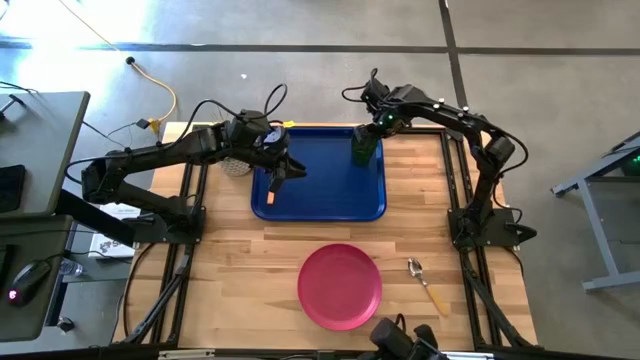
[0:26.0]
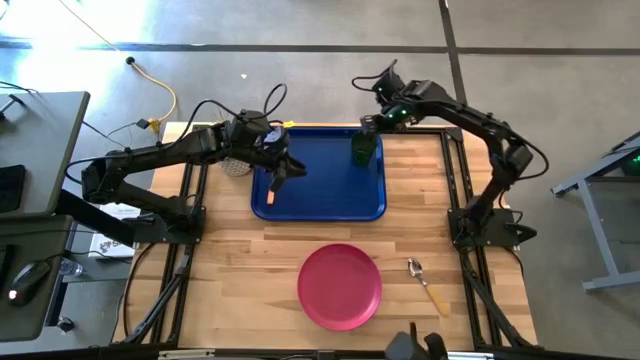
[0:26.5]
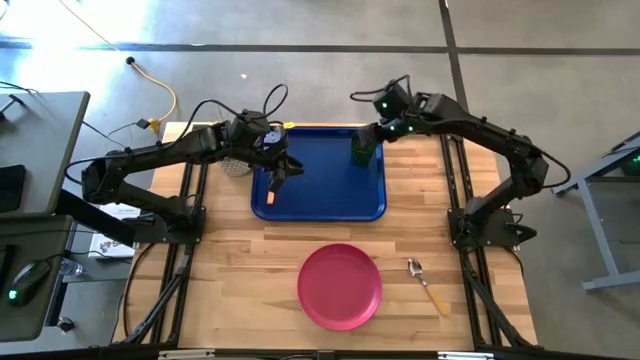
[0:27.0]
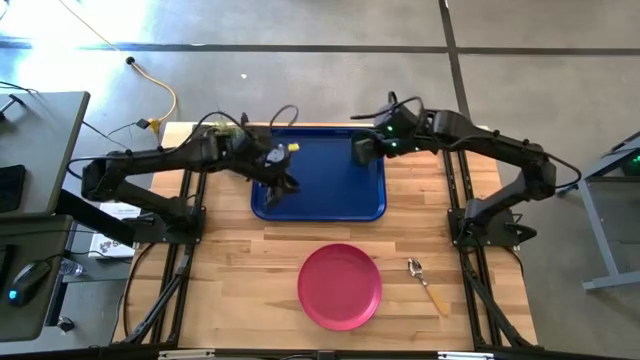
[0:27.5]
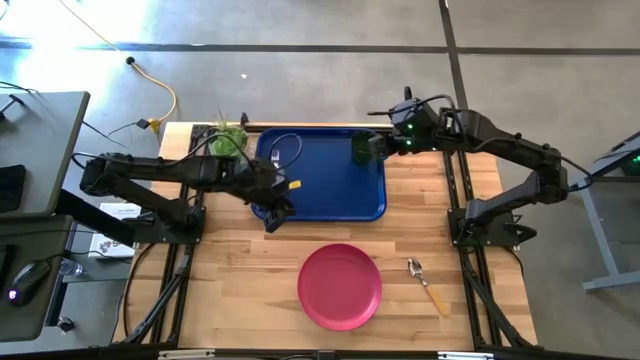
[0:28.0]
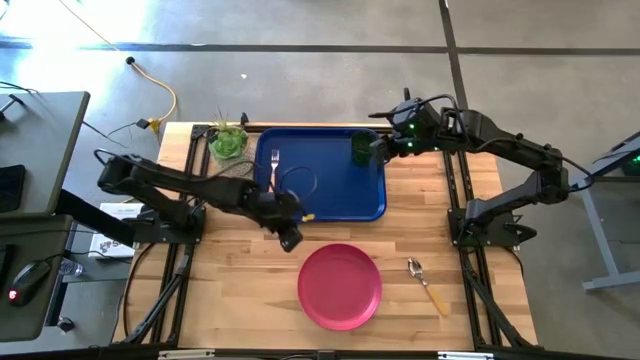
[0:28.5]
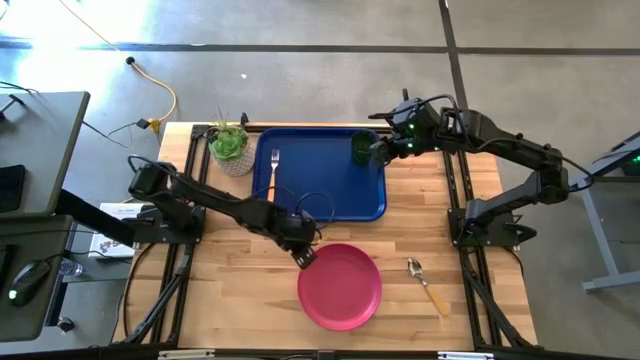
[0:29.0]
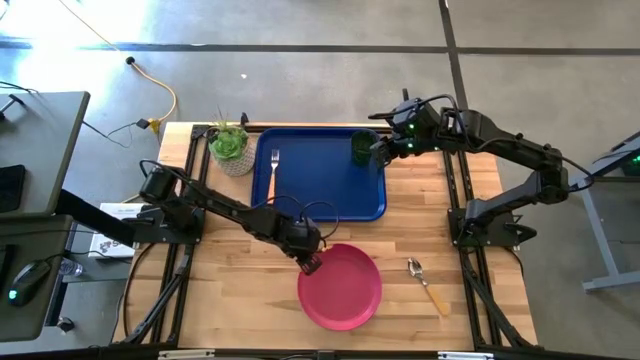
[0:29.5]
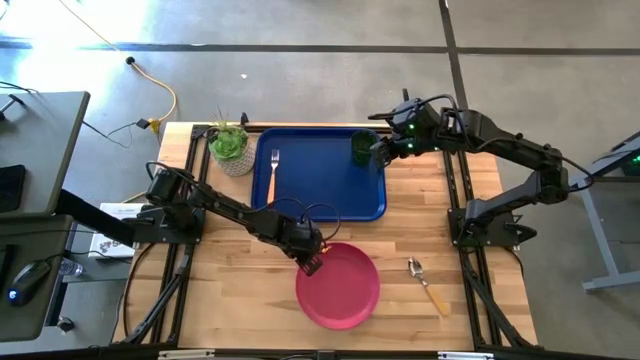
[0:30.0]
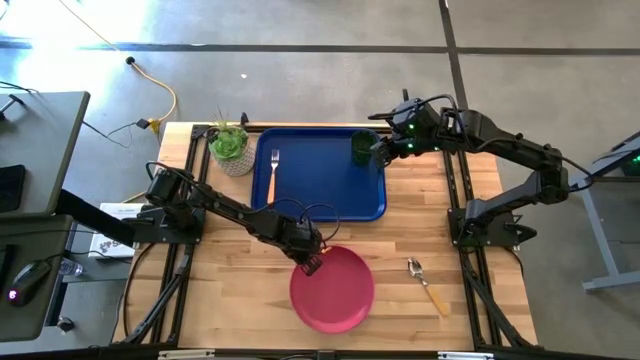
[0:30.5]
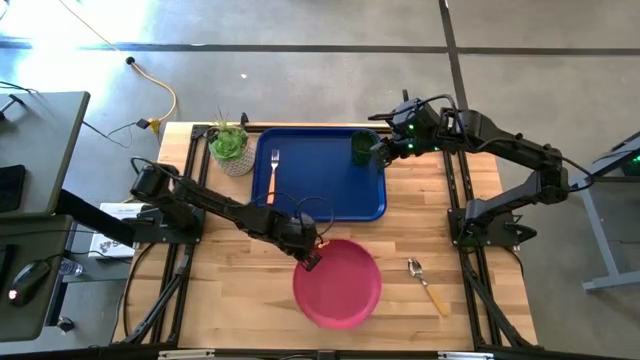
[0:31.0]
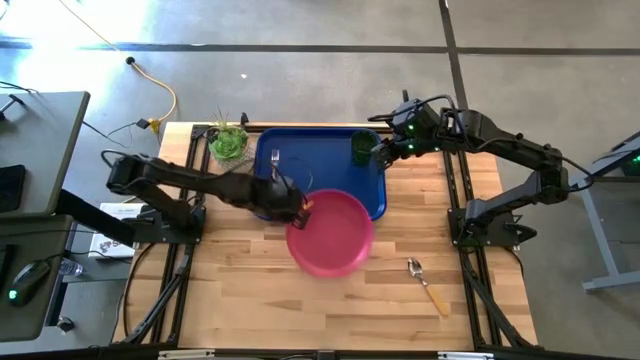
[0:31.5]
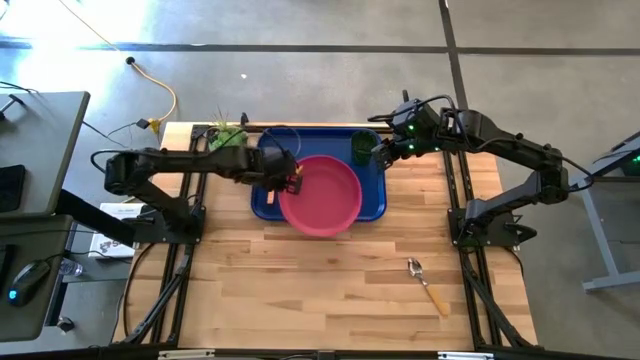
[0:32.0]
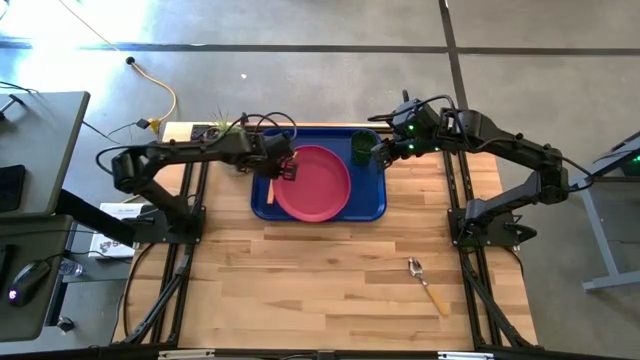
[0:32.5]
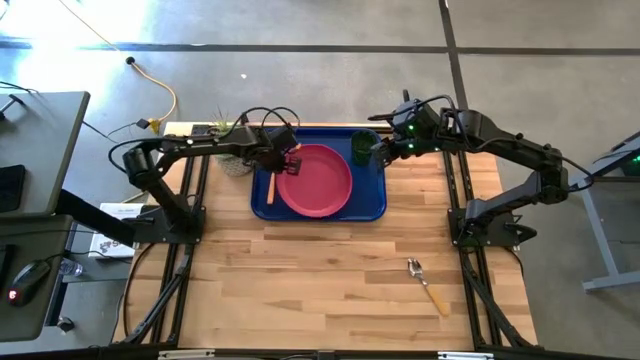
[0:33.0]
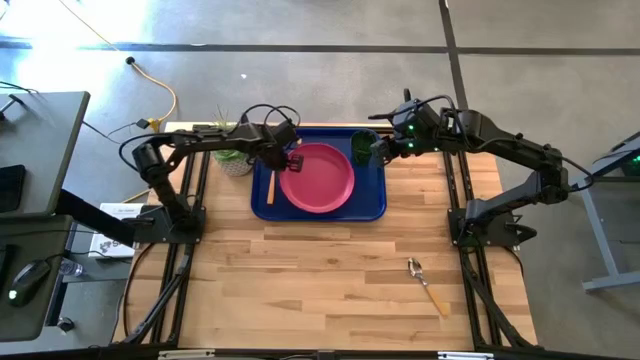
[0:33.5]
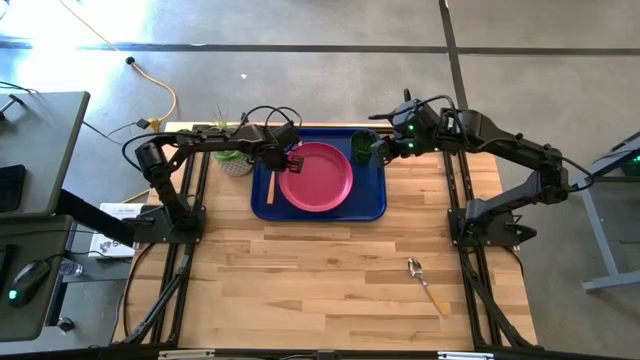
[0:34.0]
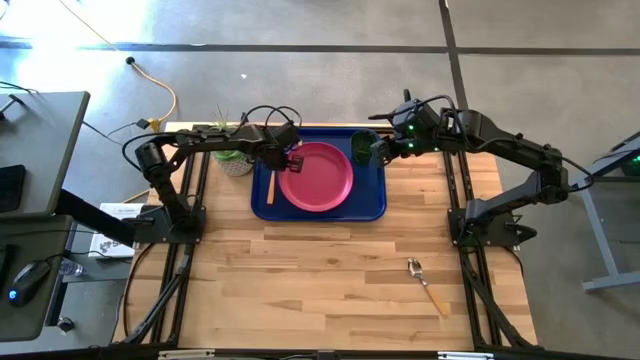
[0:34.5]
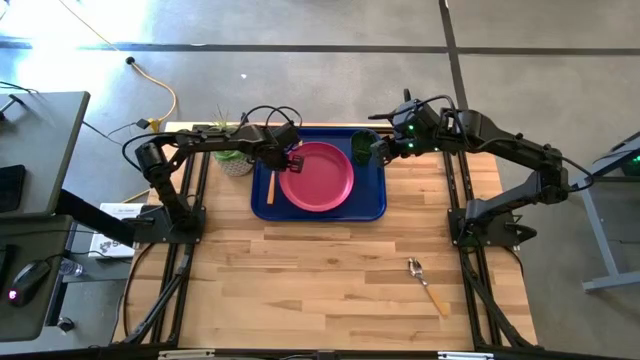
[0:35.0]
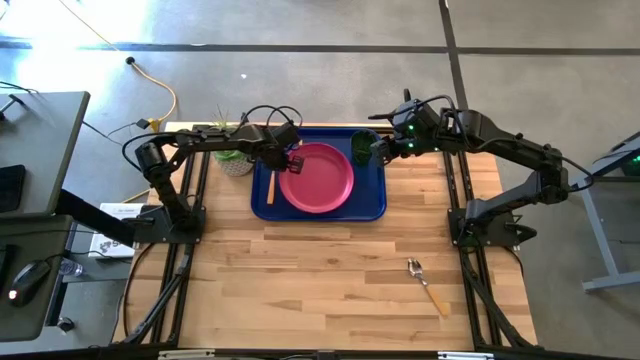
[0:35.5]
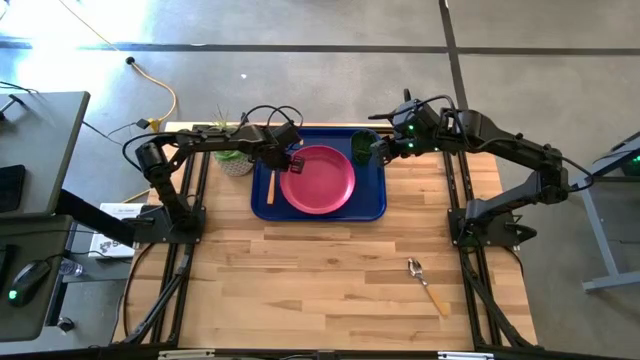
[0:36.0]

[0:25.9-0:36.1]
Task: Pick and place plate/cup/fork/spoon on tray
Put the pink plate on the blue tray

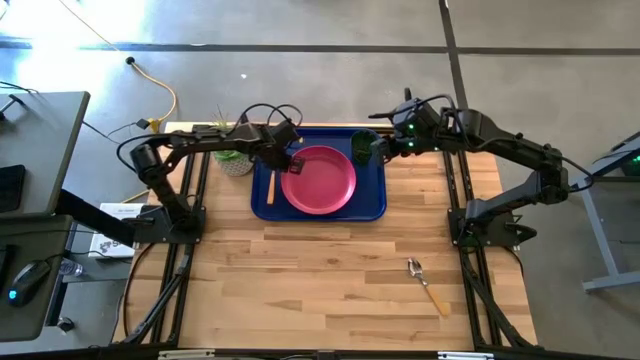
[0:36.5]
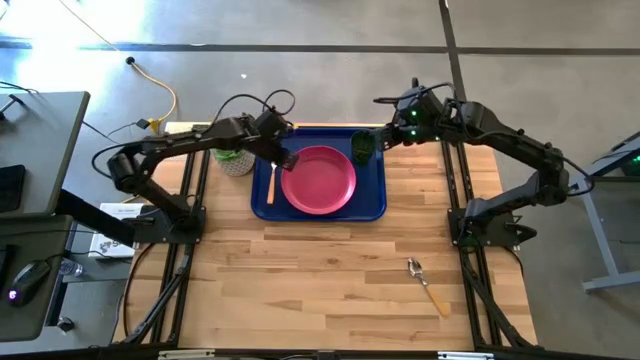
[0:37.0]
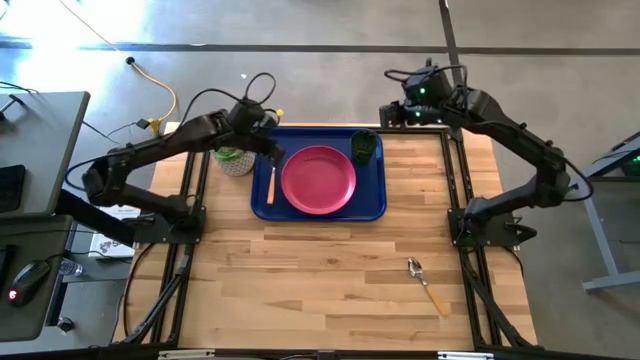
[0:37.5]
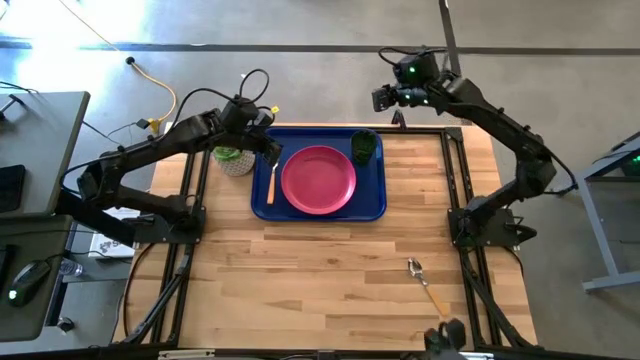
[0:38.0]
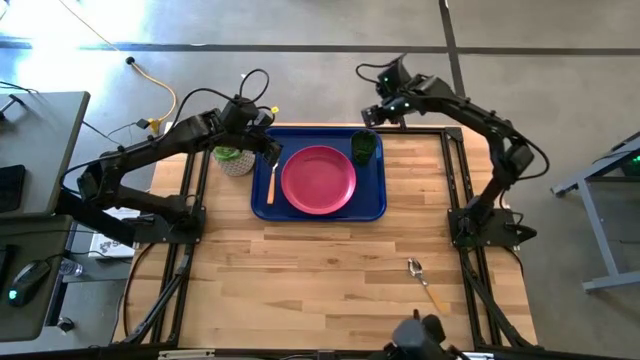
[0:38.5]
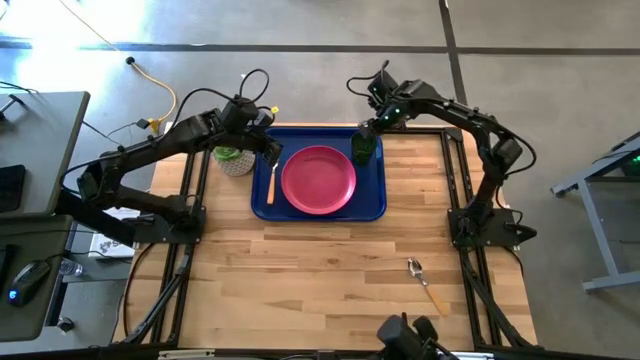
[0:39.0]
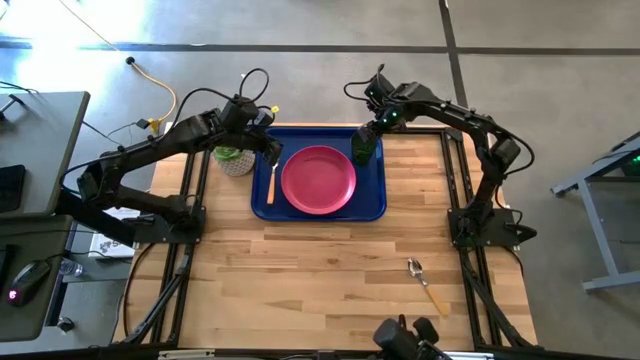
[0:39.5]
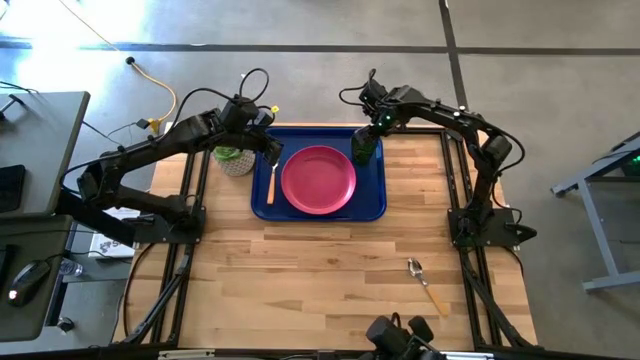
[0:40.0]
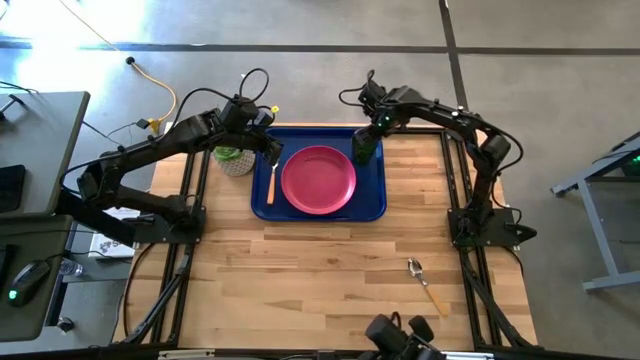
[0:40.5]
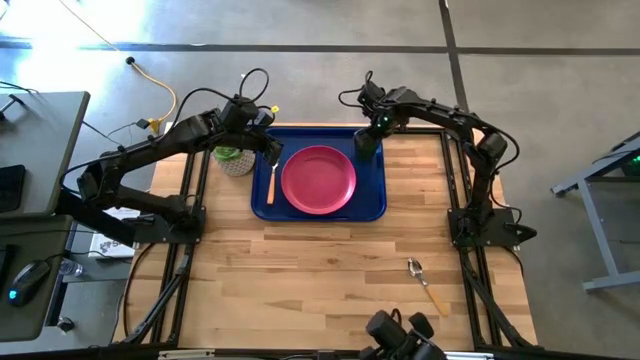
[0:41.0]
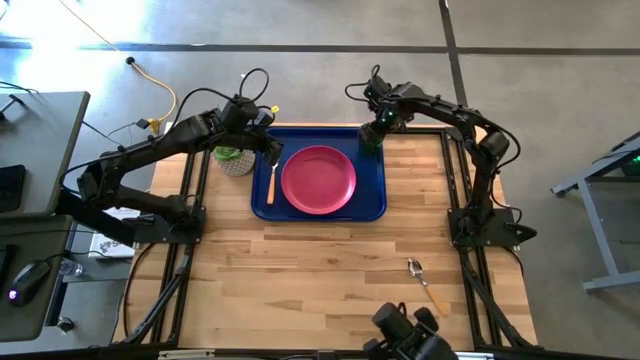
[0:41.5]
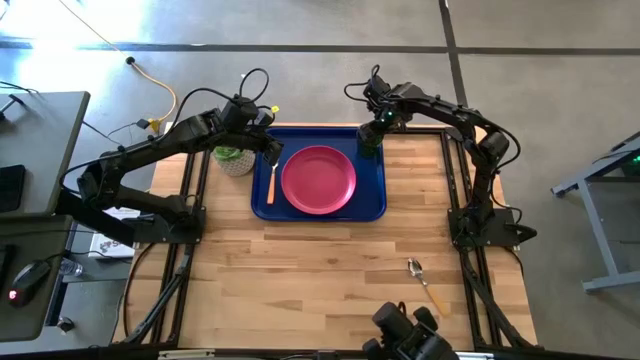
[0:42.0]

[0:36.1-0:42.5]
Adjust the green cup on the blue tray

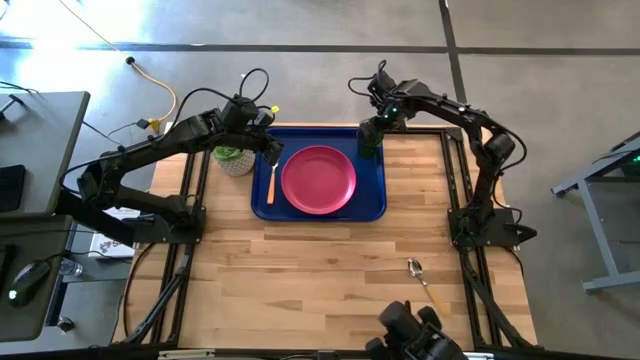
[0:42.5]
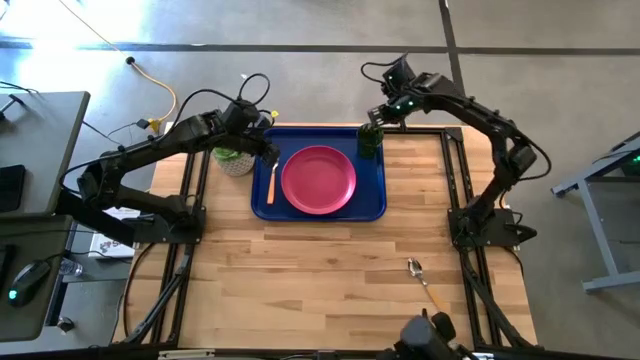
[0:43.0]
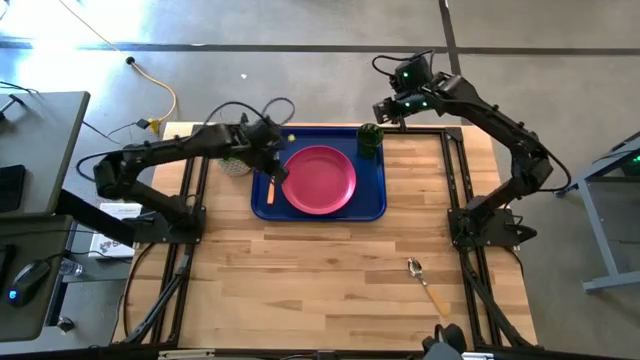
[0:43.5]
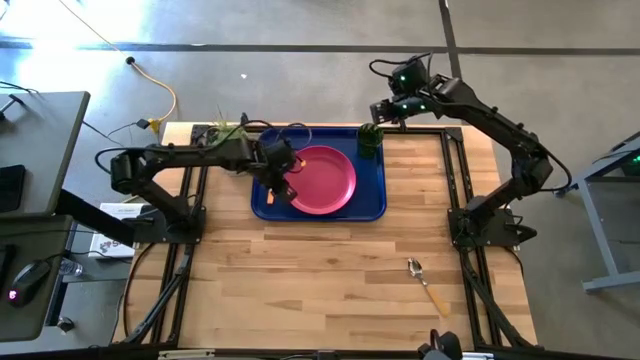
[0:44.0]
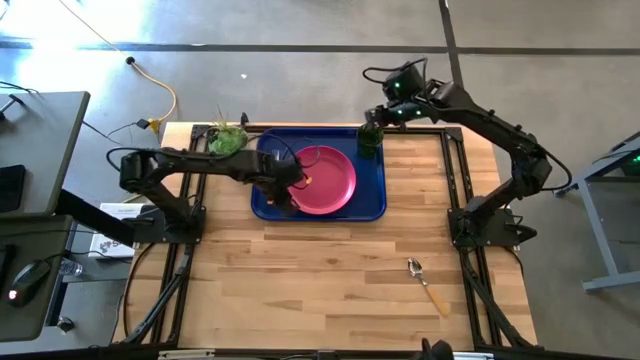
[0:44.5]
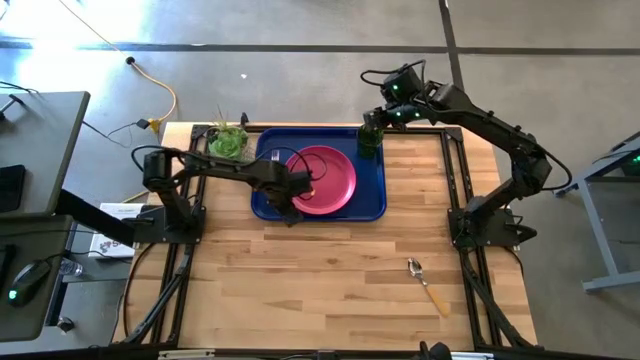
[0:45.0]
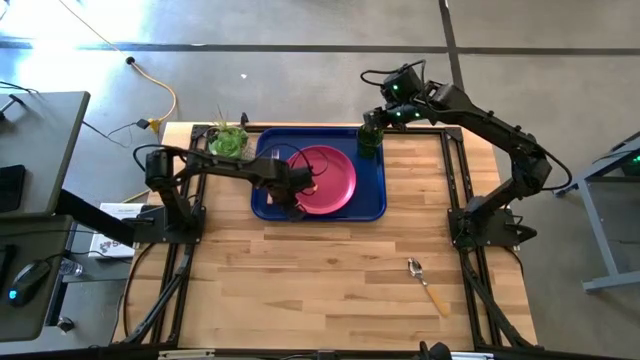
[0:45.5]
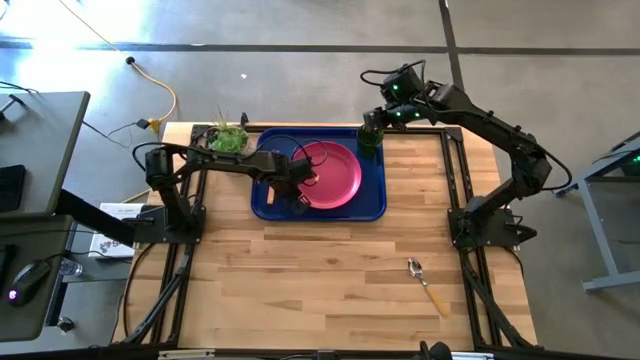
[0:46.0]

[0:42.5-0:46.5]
Adjust the pink plate on the blue tray

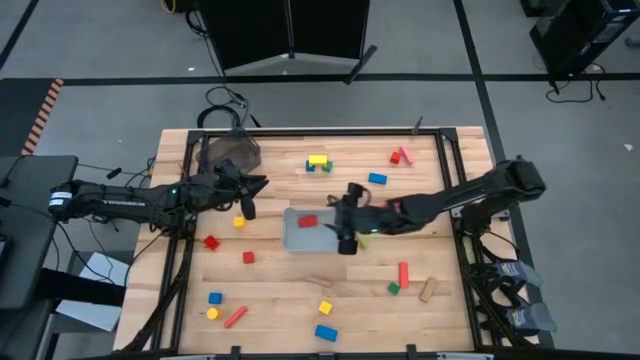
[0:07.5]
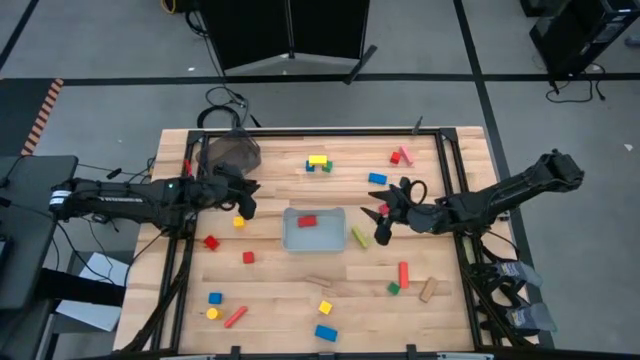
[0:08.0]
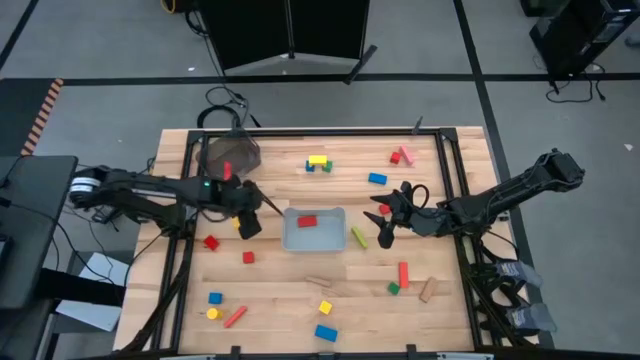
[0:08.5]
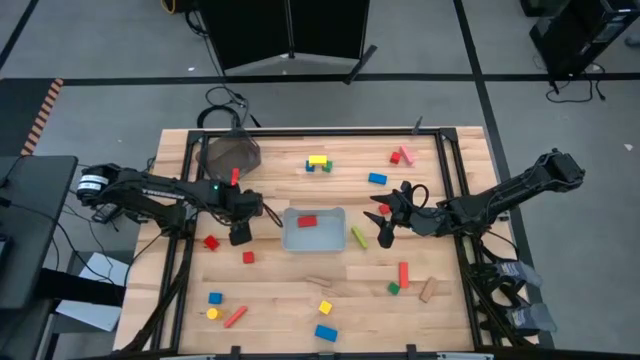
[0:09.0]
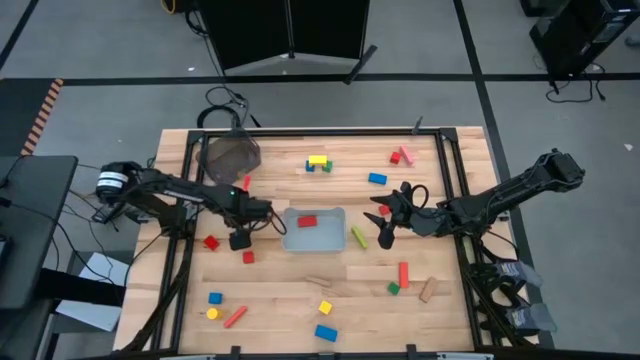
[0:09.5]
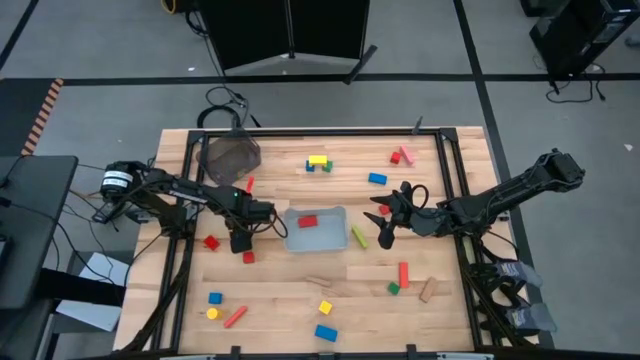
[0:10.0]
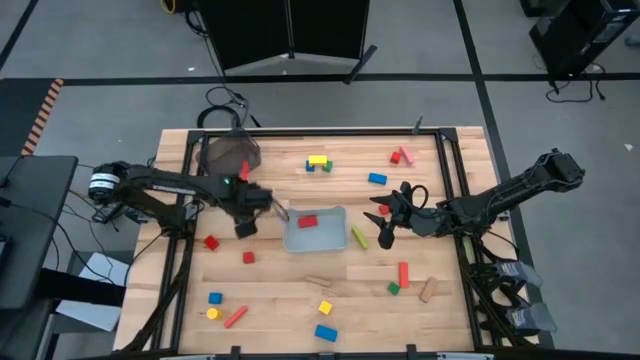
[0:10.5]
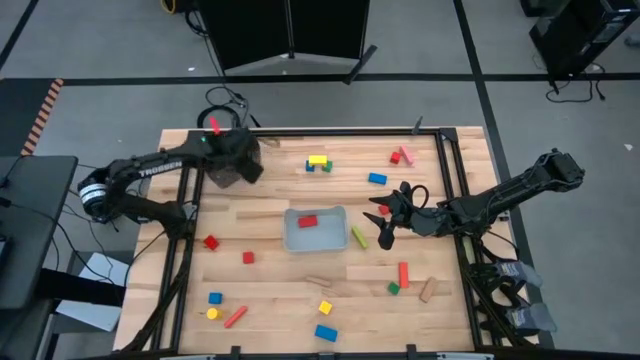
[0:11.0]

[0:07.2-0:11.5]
Task: Sort blocks by size
Put the top yellow cube block into the black bin
